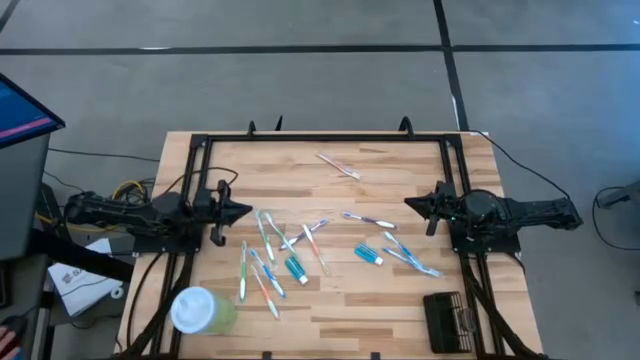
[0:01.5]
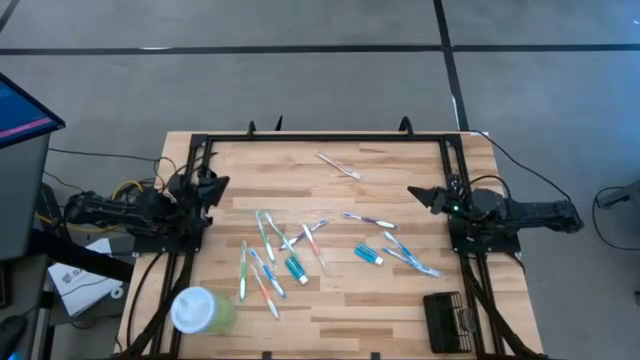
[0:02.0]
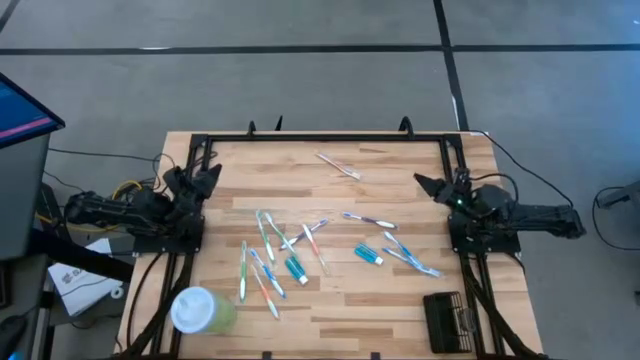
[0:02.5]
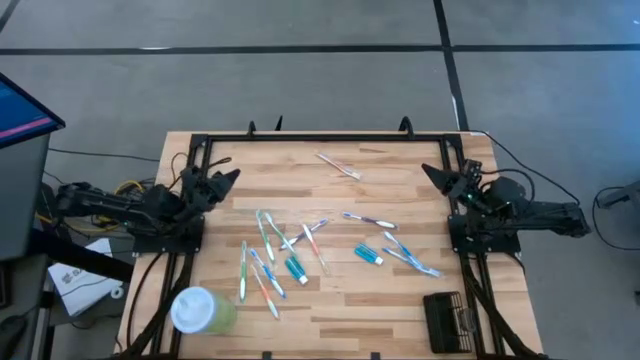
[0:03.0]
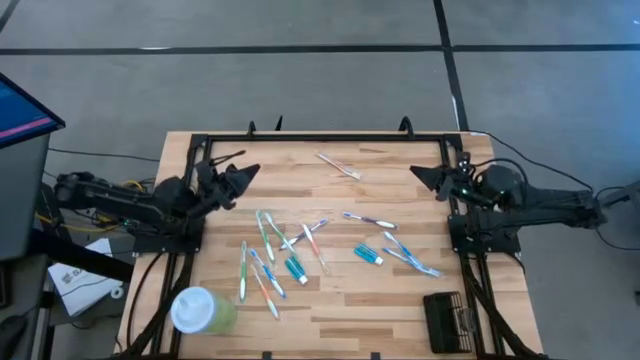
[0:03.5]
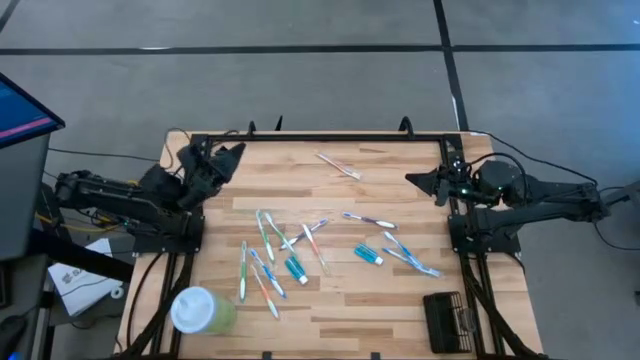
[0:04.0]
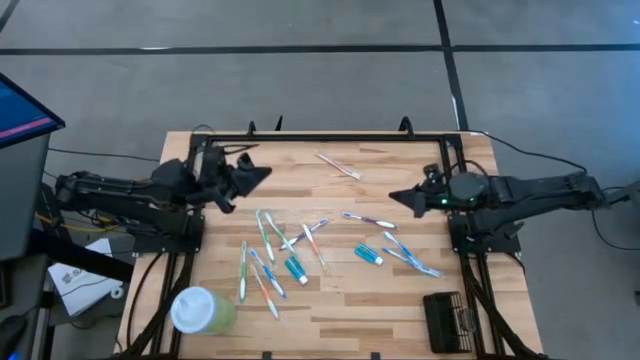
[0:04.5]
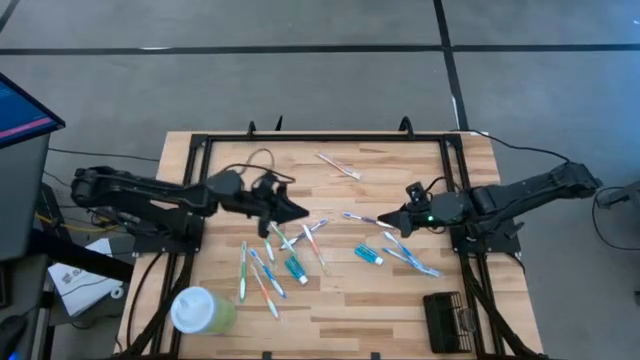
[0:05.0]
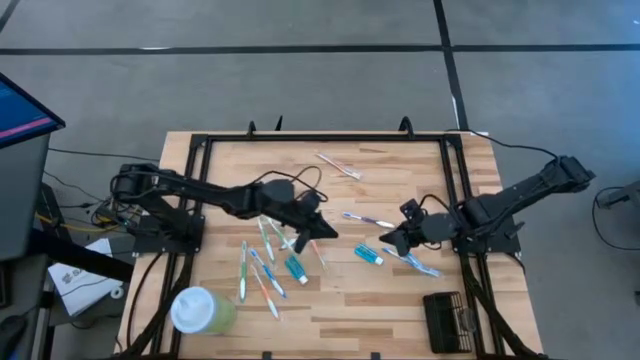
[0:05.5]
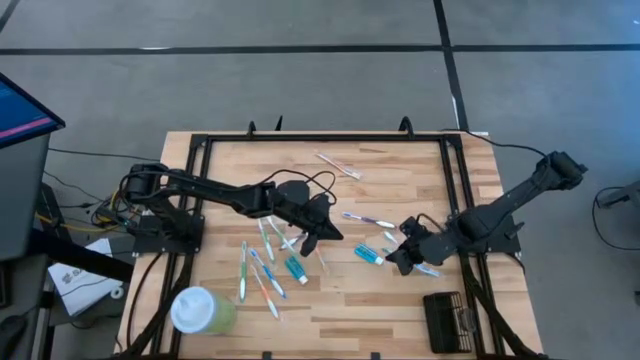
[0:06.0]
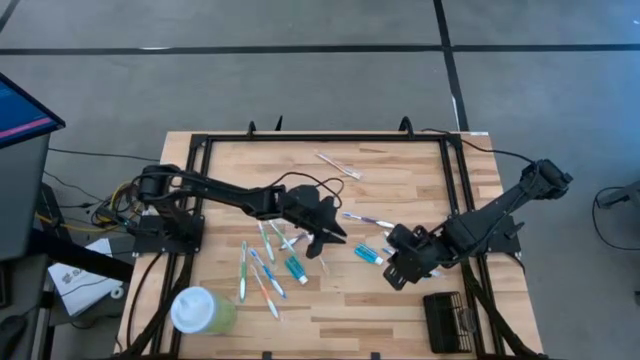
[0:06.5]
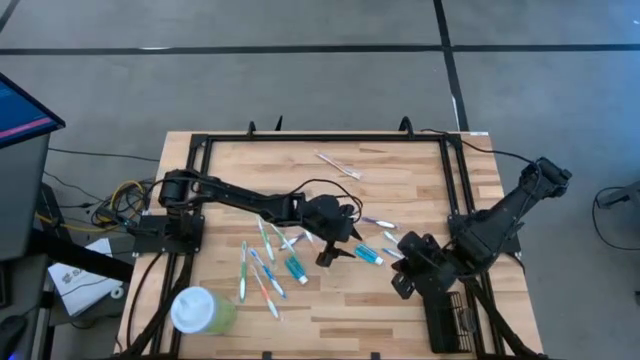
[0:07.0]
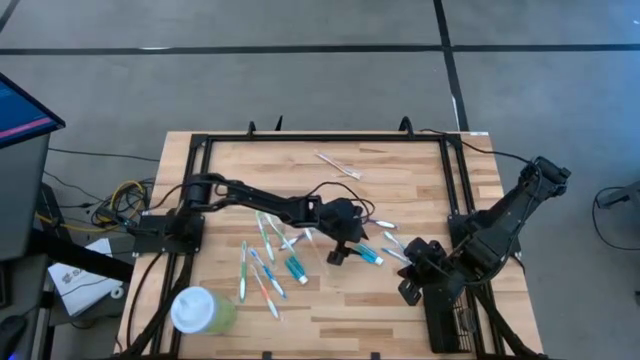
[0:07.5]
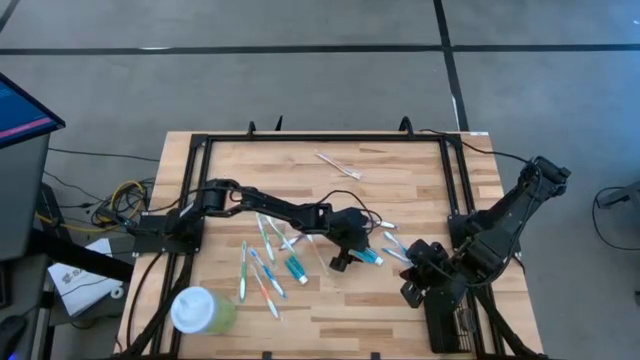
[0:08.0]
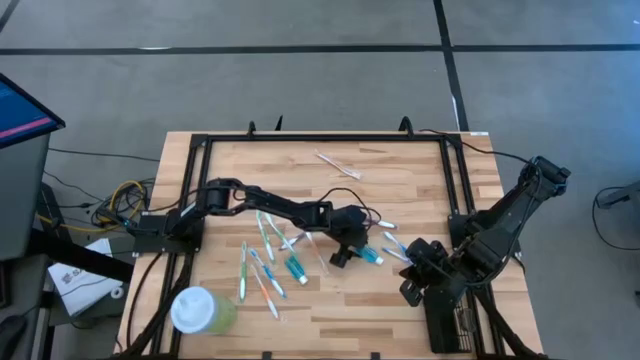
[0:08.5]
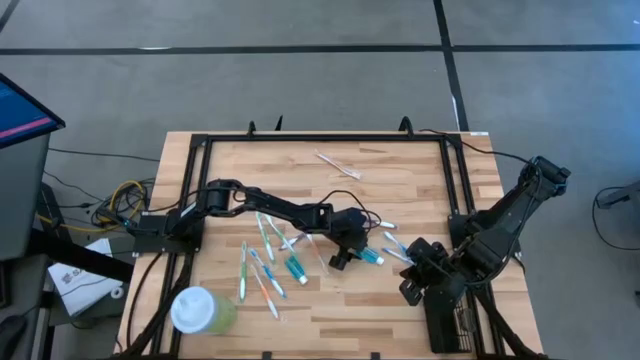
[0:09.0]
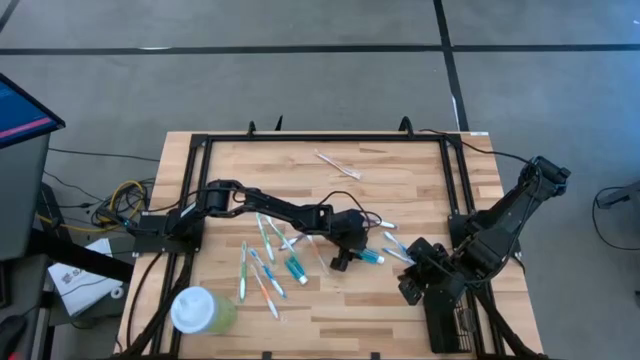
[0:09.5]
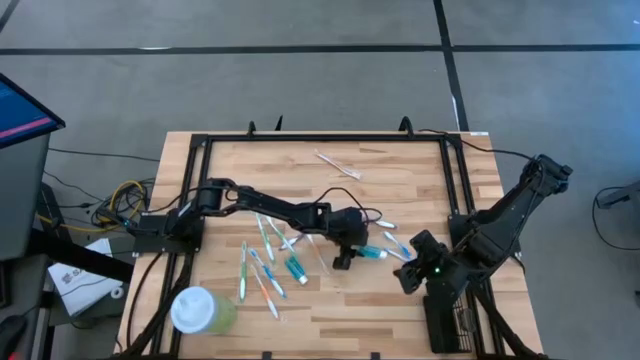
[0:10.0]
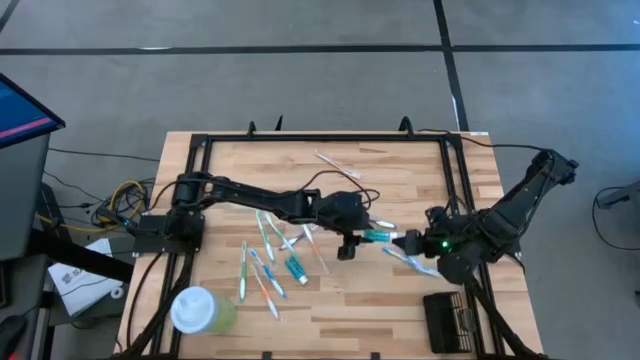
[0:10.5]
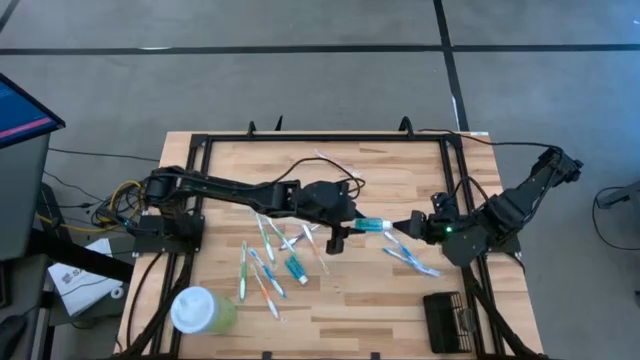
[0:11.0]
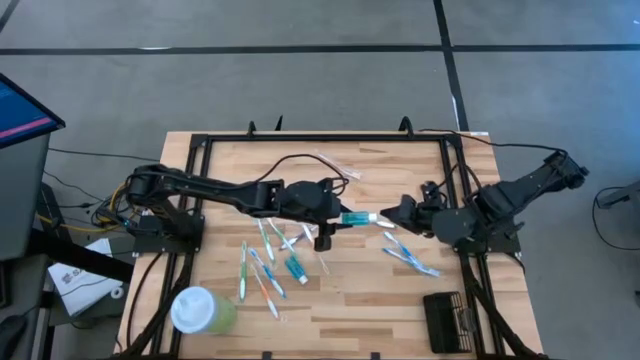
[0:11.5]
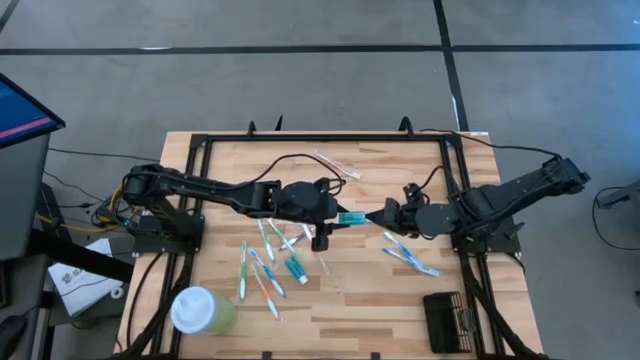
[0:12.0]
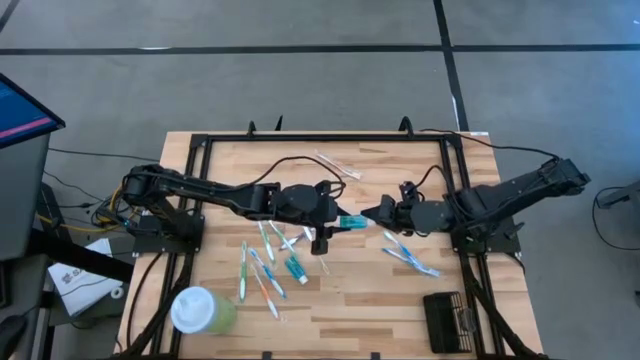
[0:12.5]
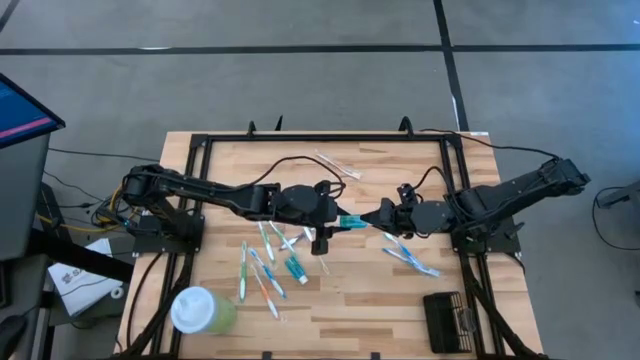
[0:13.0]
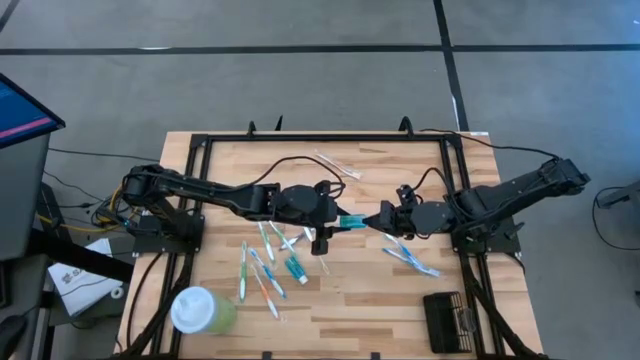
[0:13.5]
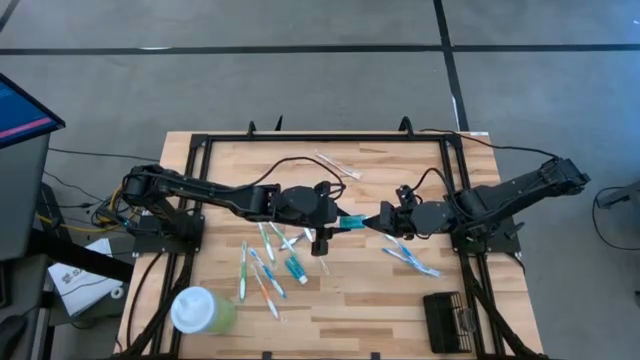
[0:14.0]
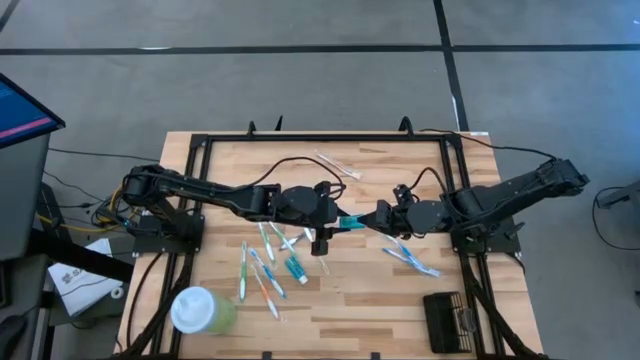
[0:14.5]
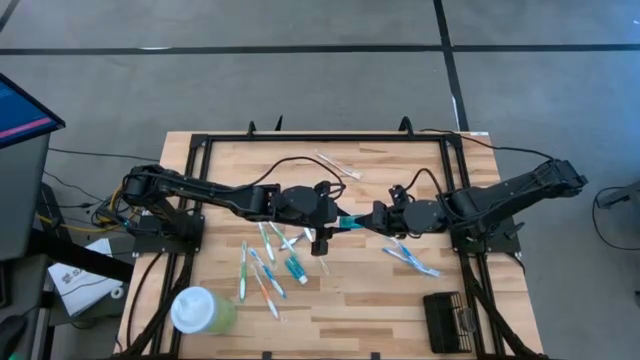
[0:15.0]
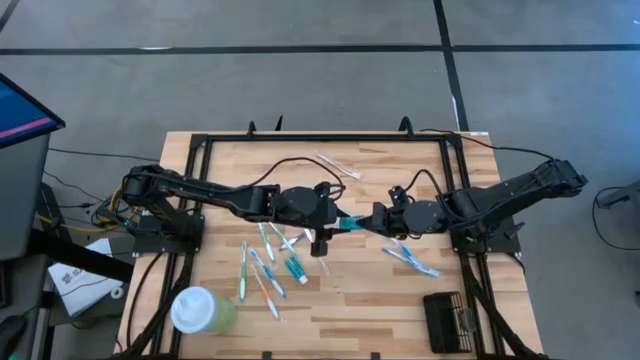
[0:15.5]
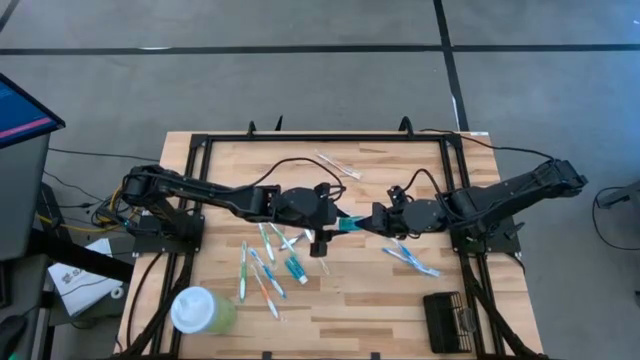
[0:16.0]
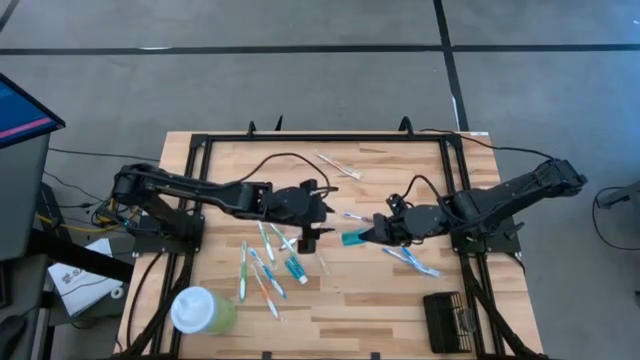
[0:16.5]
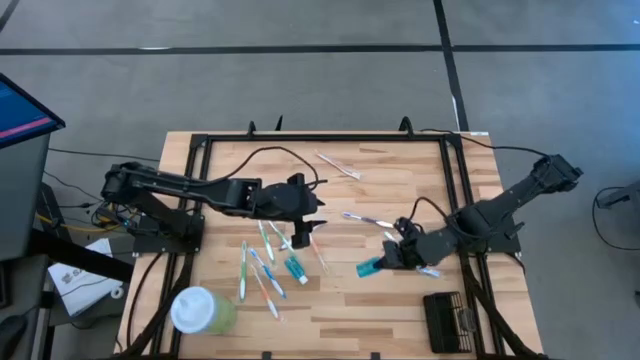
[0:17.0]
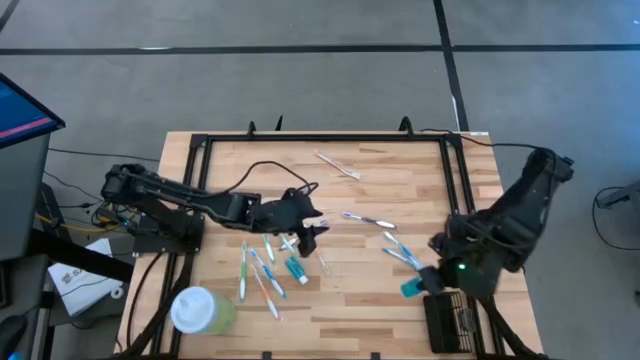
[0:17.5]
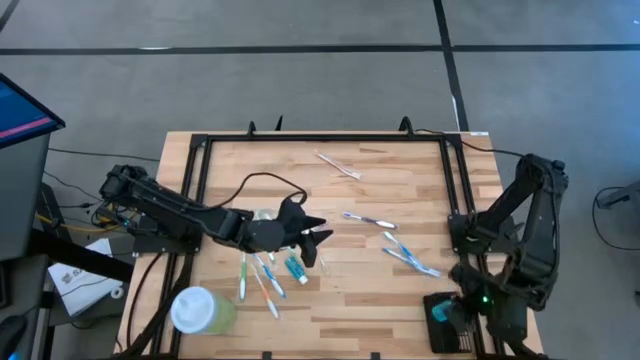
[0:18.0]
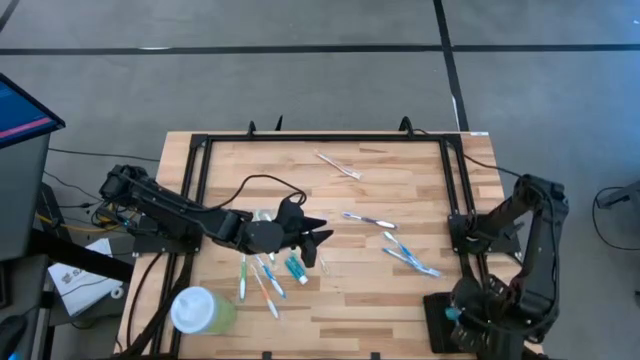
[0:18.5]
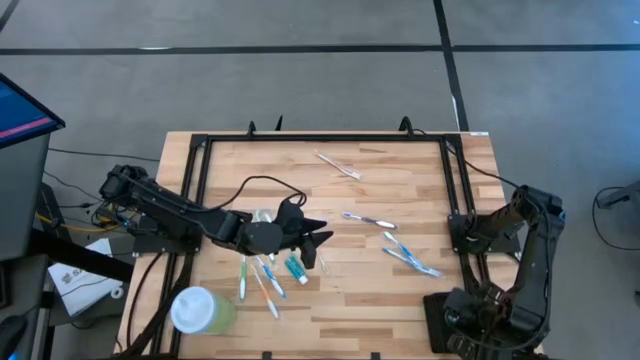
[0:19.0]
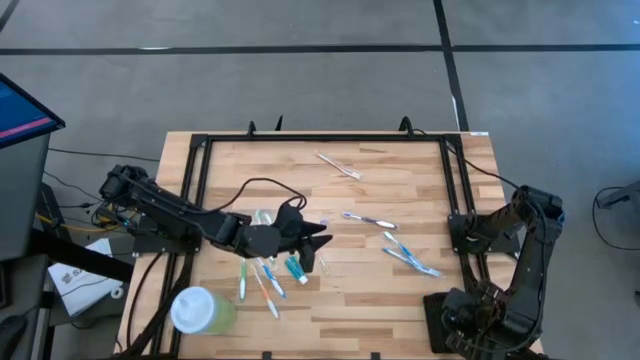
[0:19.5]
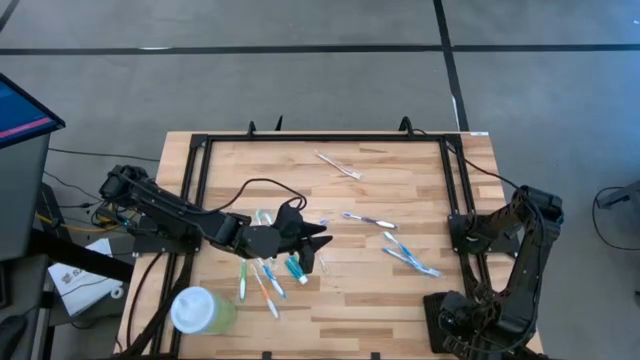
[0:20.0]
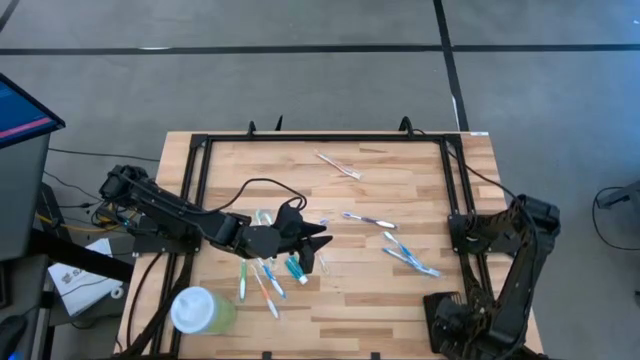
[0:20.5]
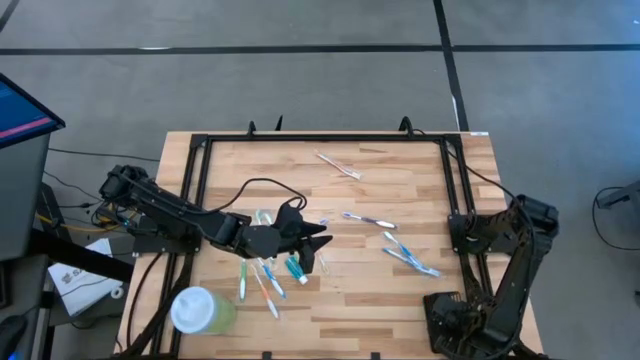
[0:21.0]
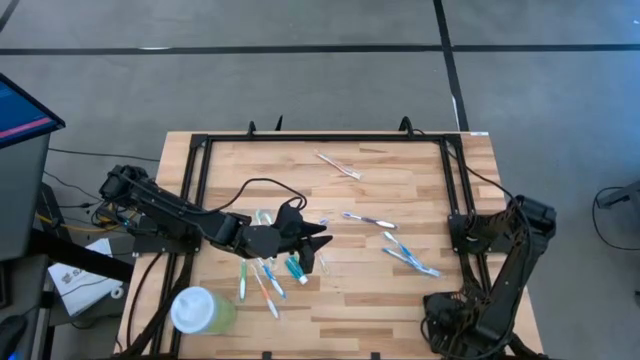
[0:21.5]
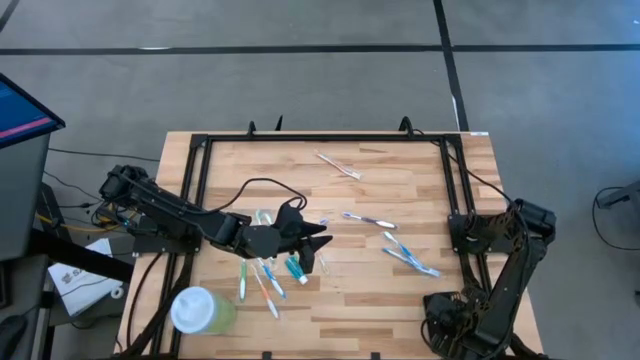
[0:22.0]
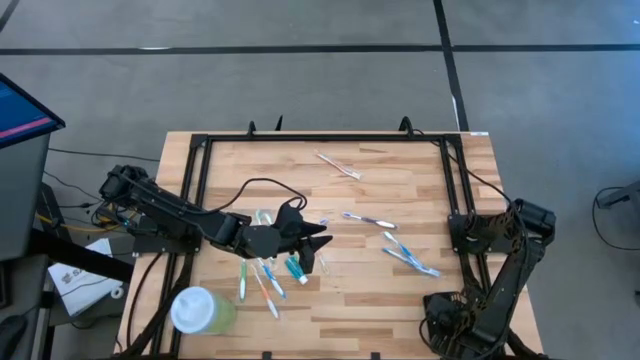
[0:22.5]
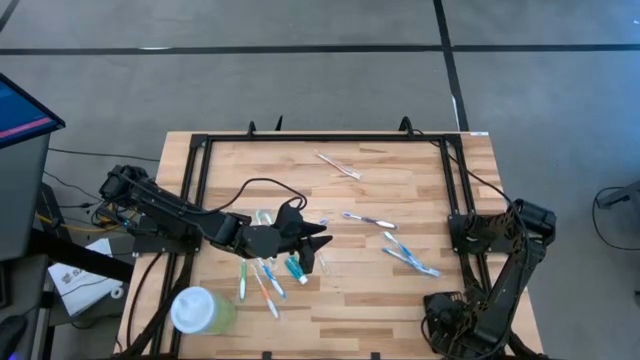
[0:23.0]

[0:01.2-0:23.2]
Task: Pick & Place toothbrushing station
Put the right blue mouthwash bottle into the black organizer
